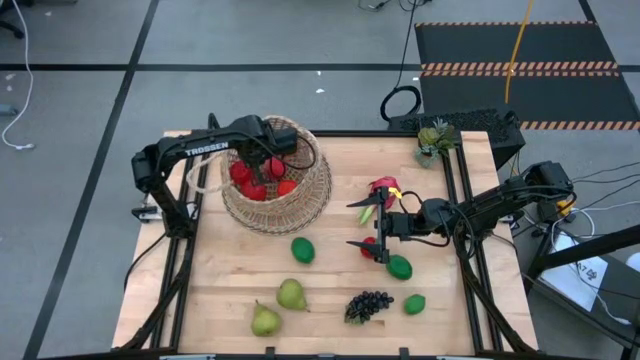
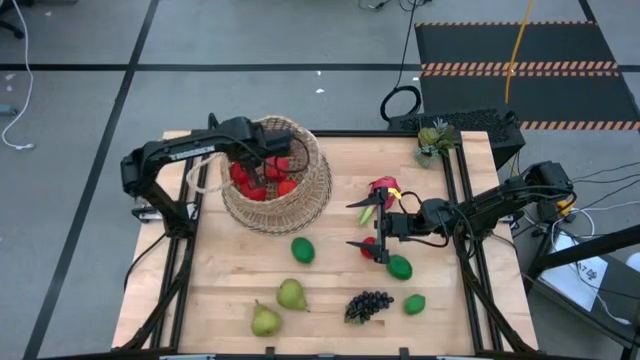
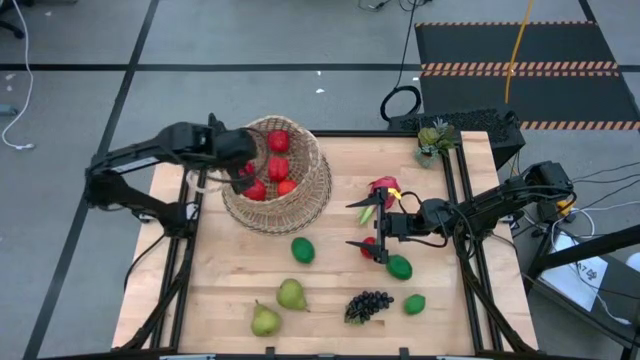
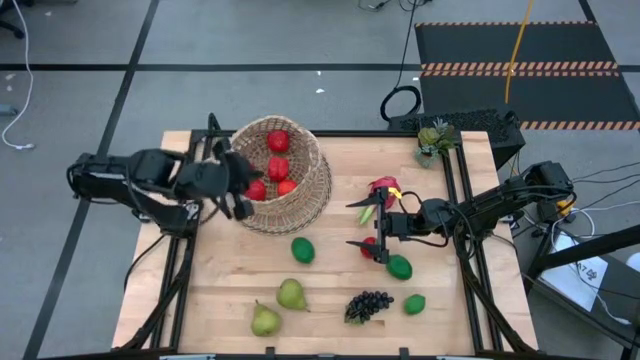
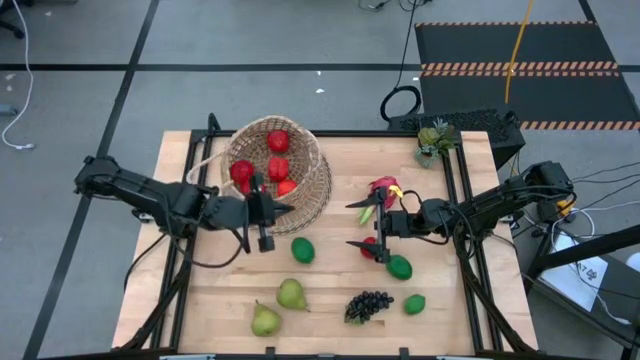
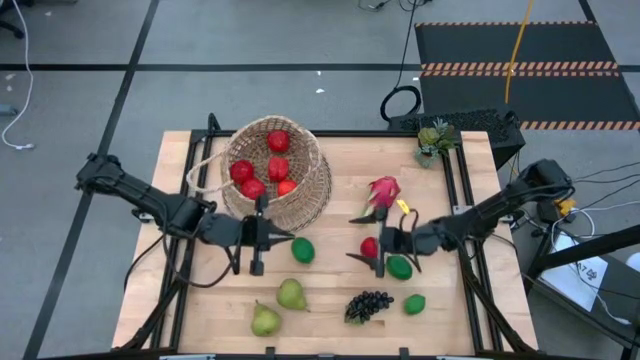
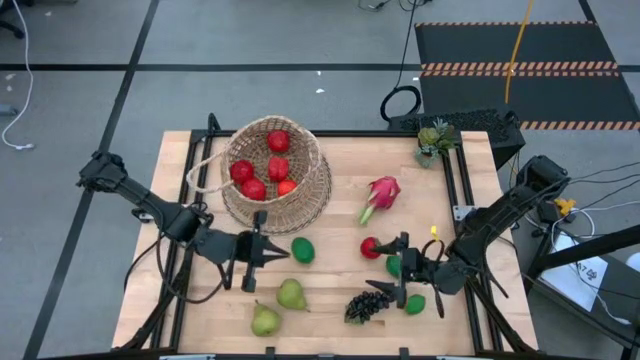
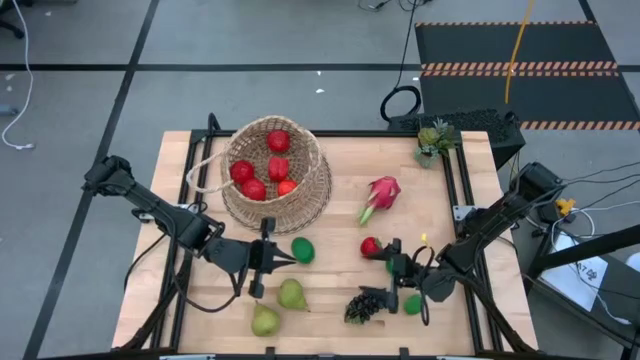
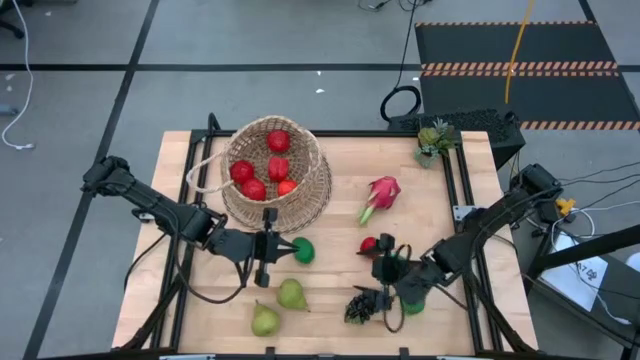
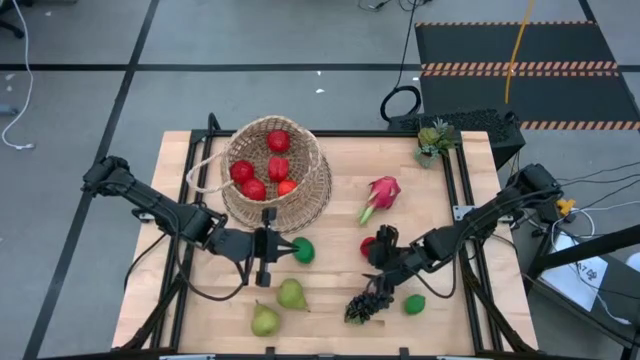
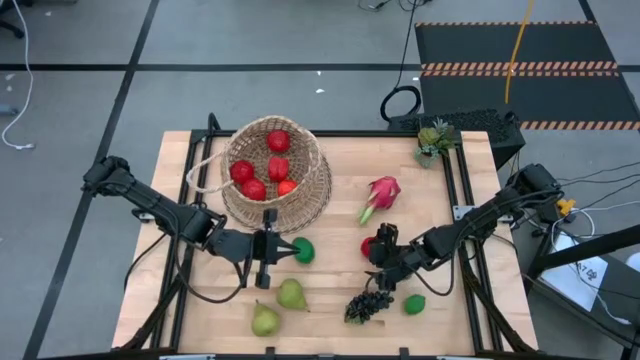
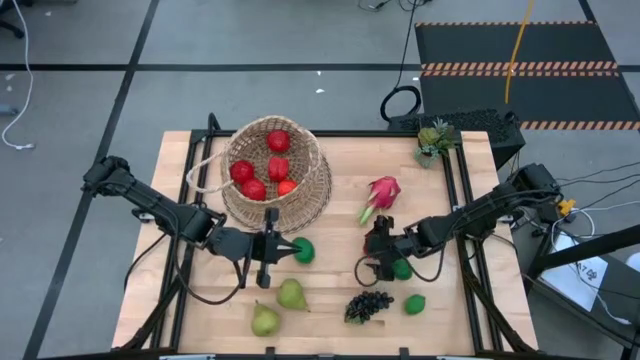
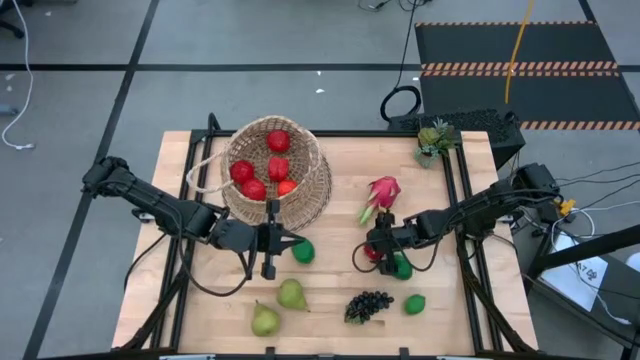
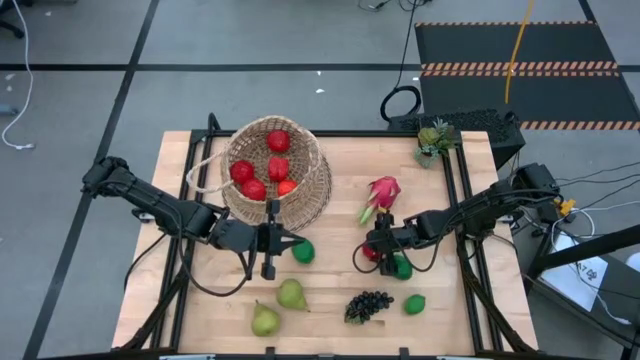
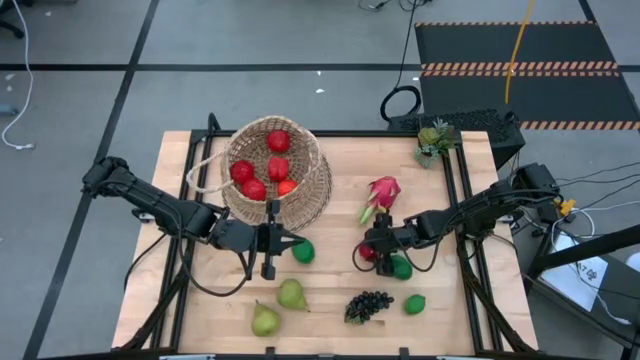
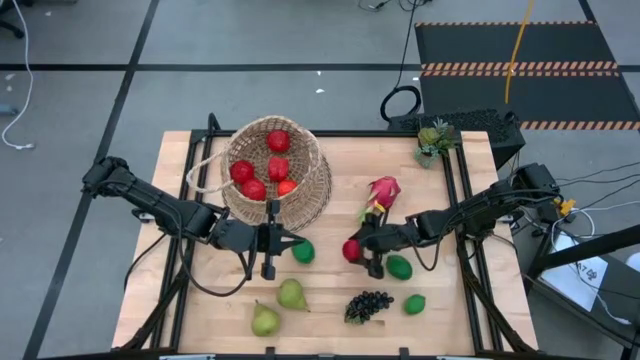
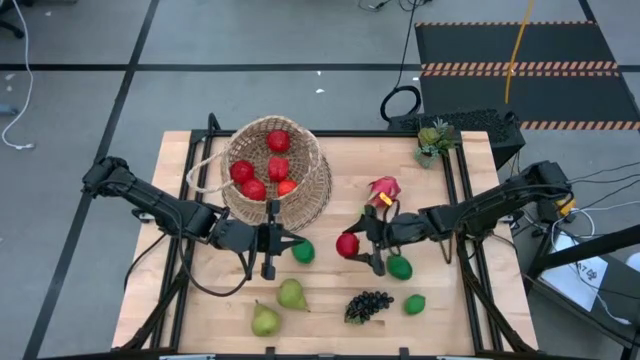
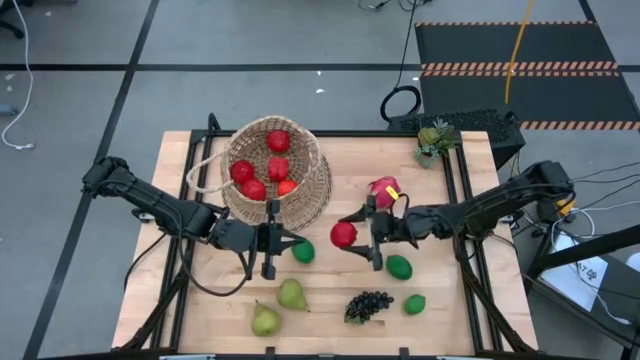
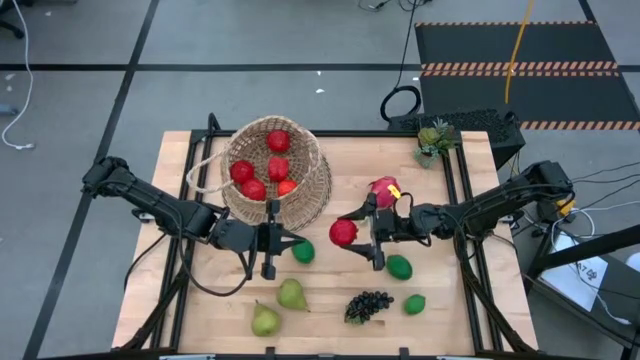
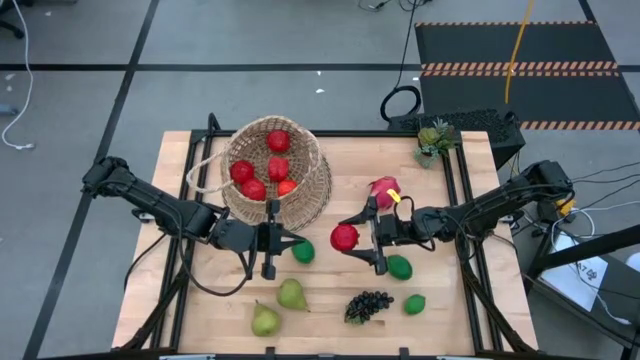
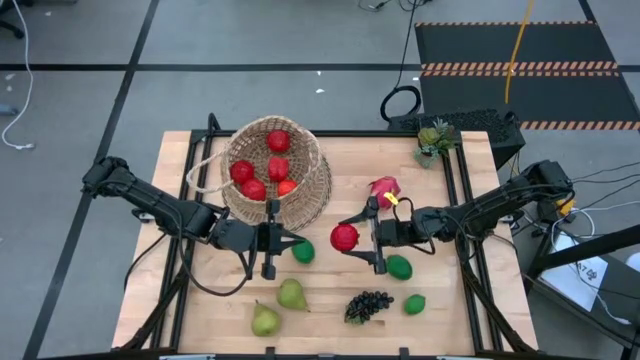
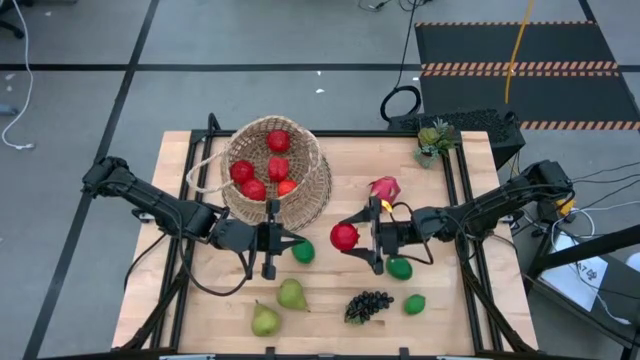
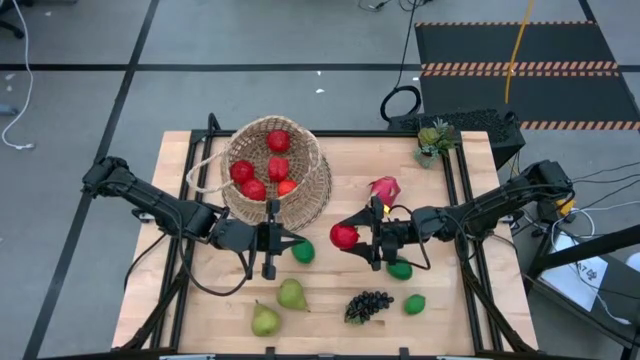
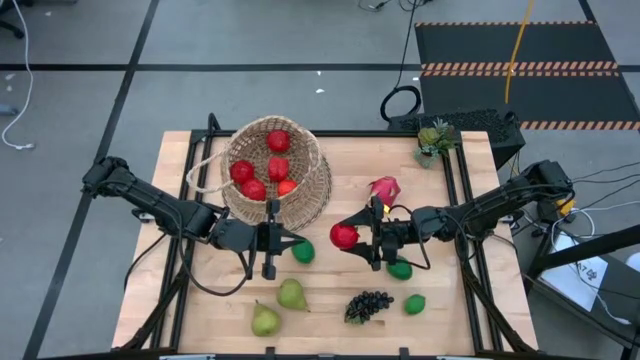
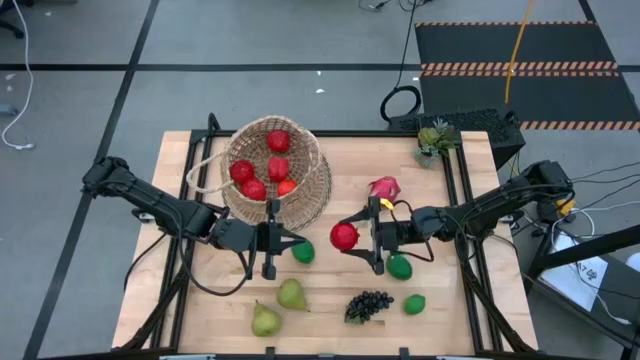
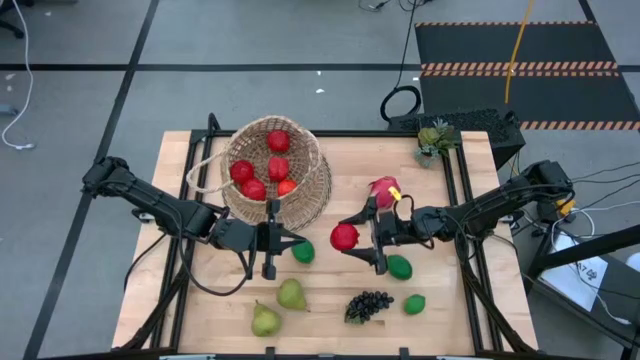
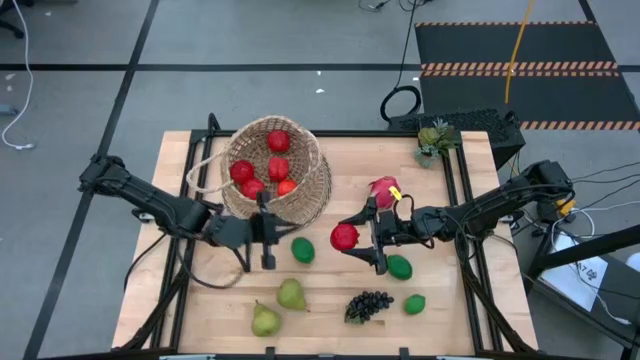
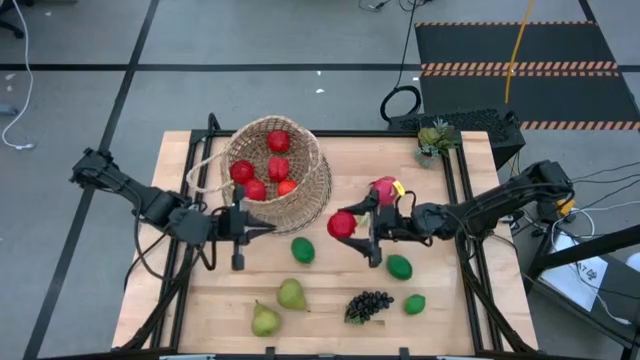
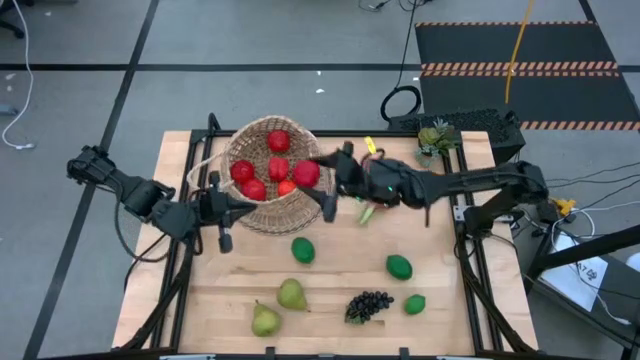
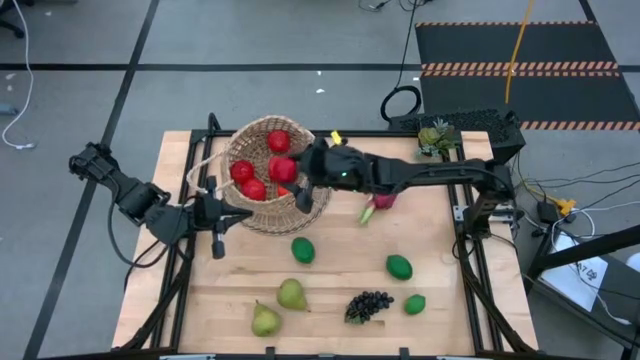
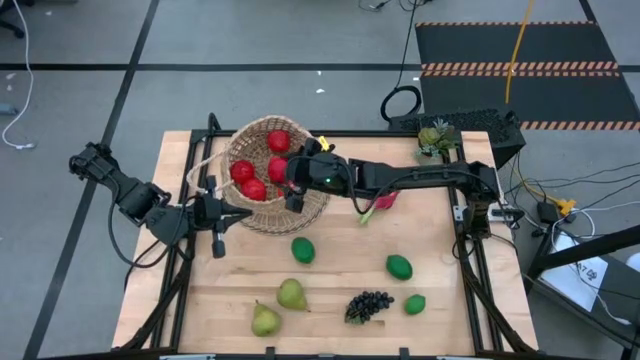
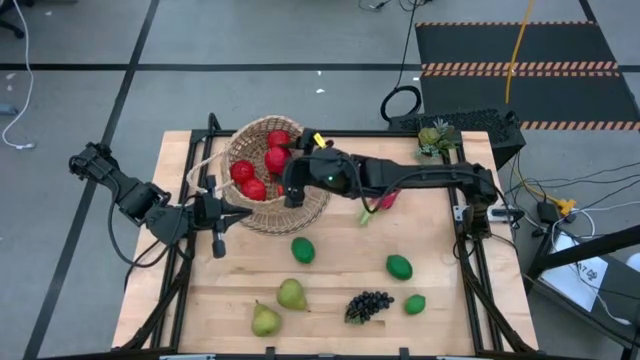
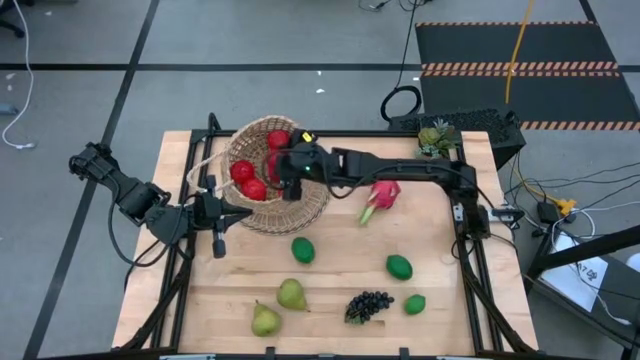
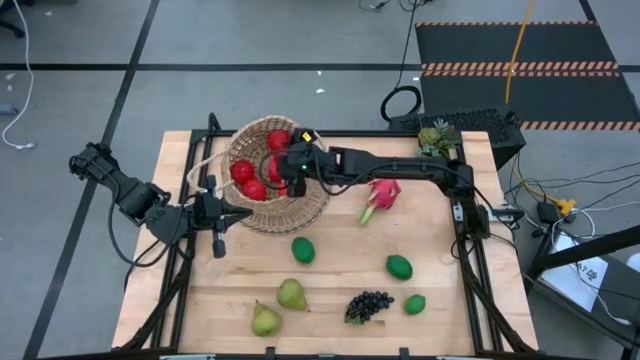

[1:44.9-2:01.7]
Task: Build produce basket
Put the tomato into the basket

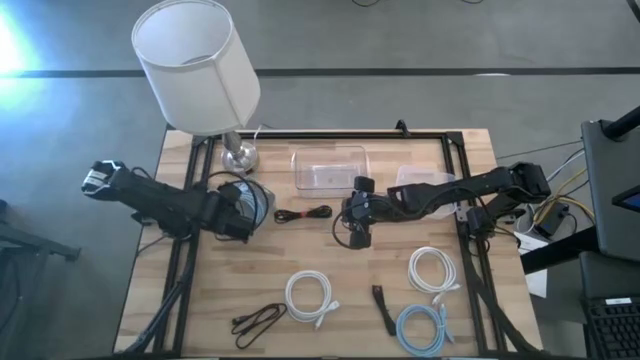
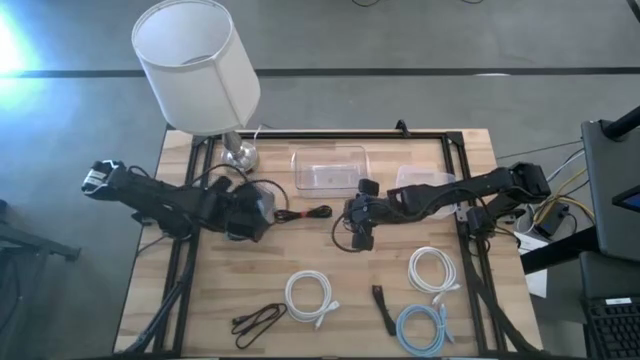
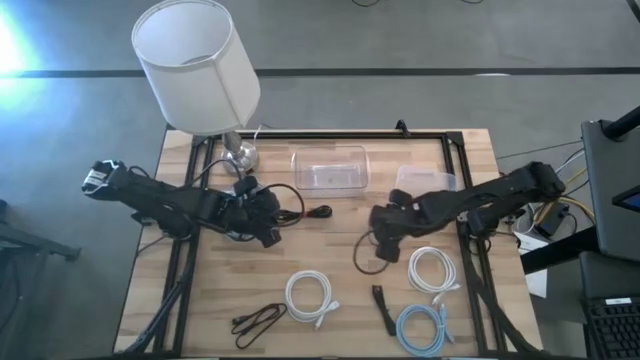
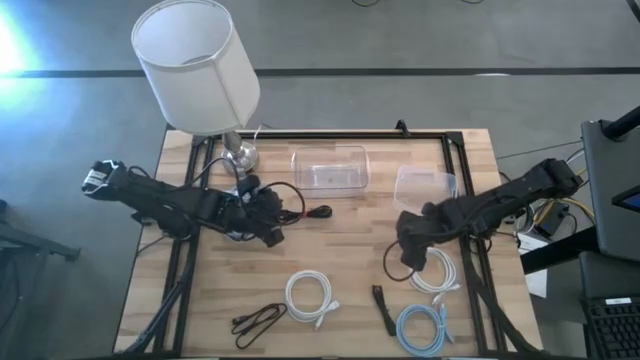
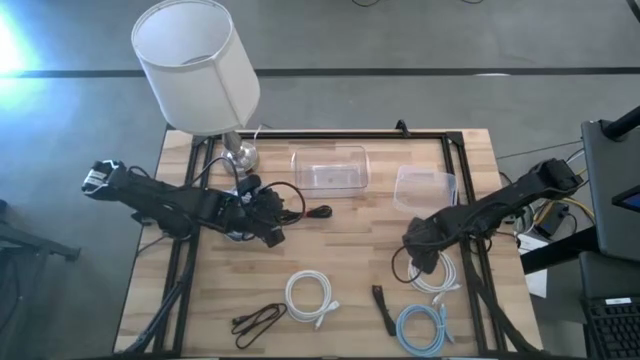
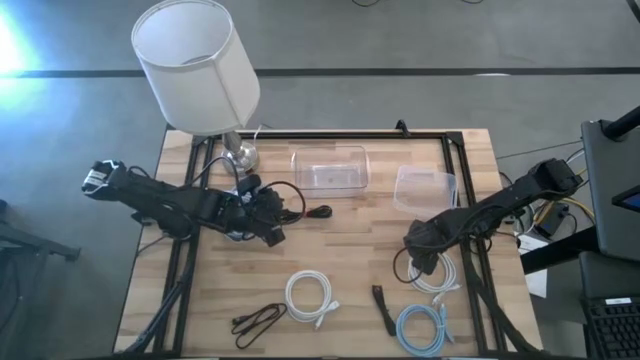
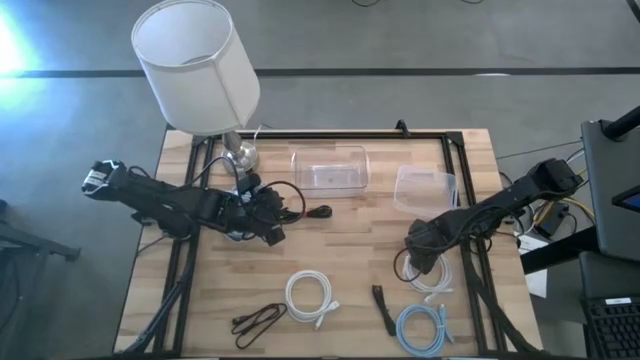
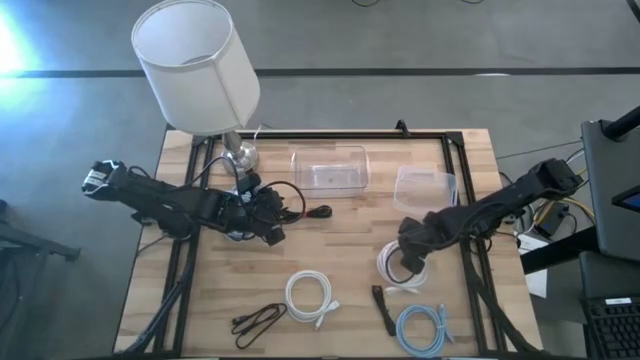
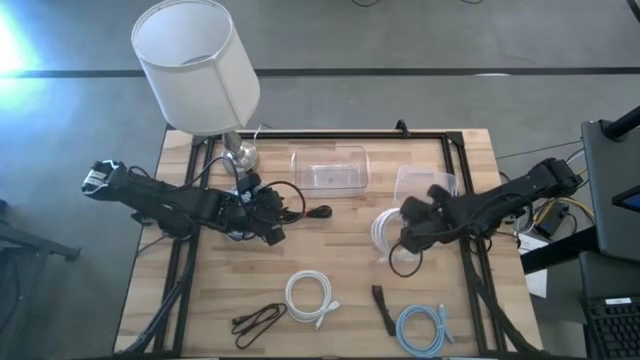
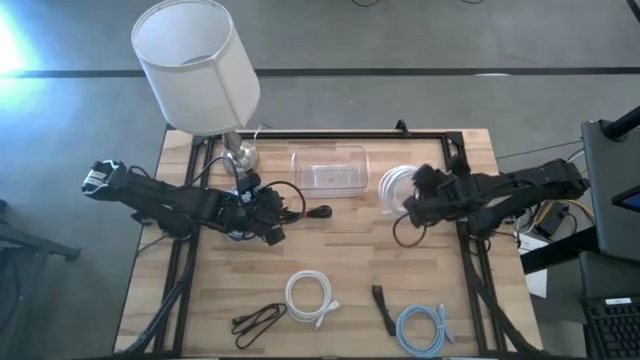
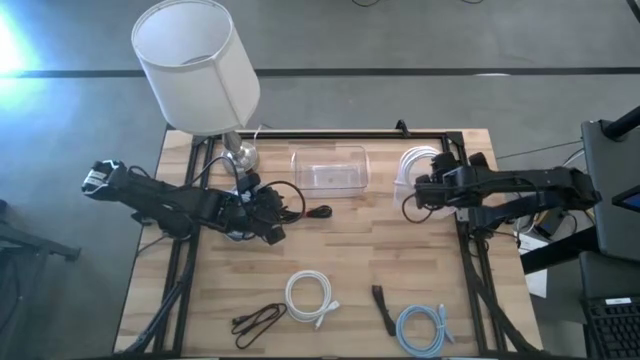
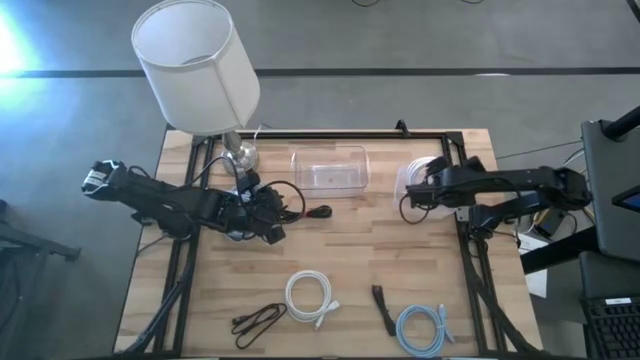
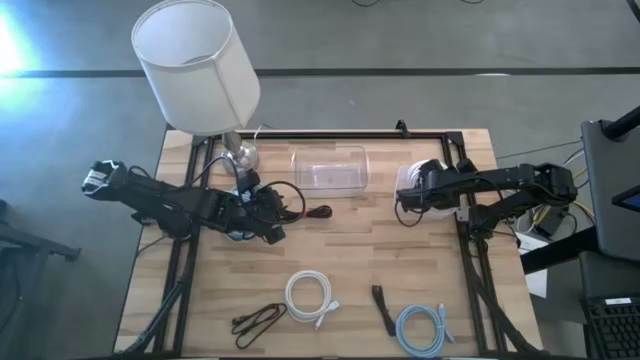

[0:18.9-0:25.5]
Task: Pick & Place USB Port
Put the right white USB cable into the right transparent bin
